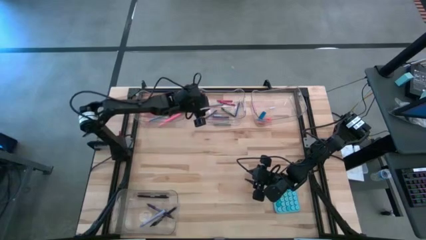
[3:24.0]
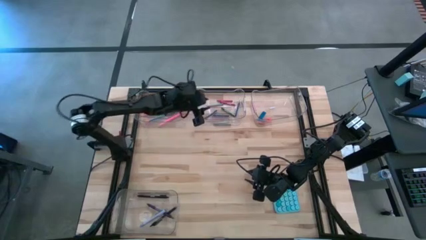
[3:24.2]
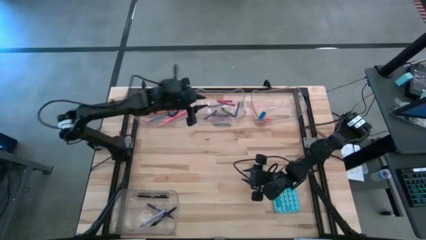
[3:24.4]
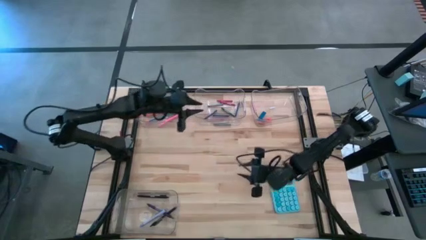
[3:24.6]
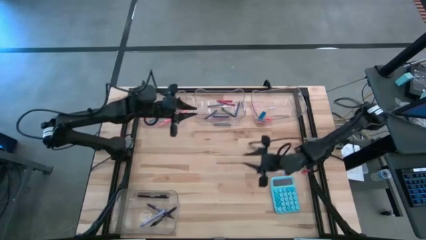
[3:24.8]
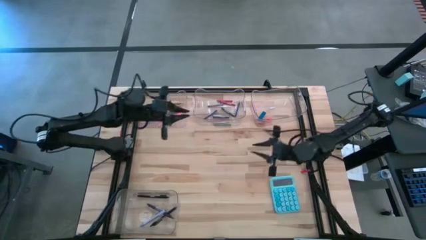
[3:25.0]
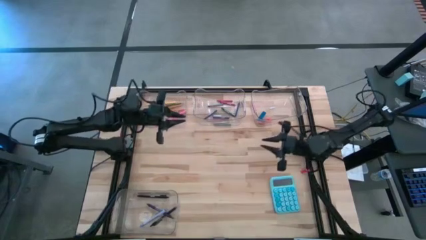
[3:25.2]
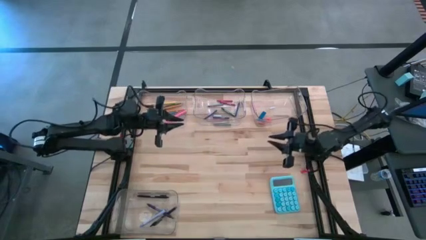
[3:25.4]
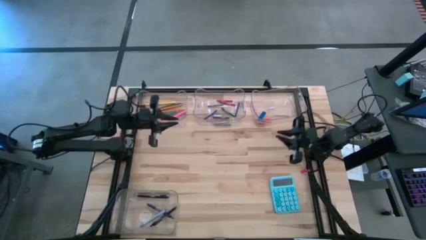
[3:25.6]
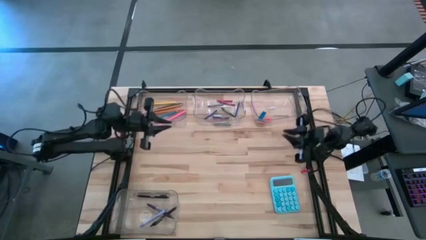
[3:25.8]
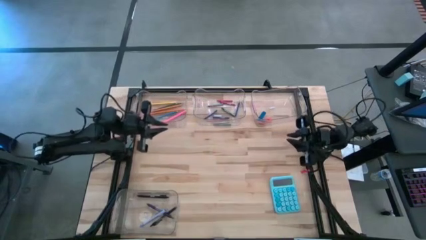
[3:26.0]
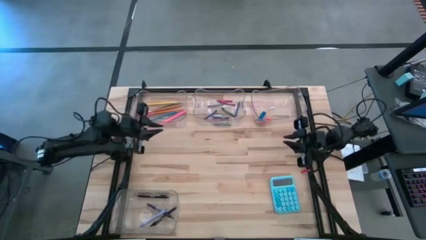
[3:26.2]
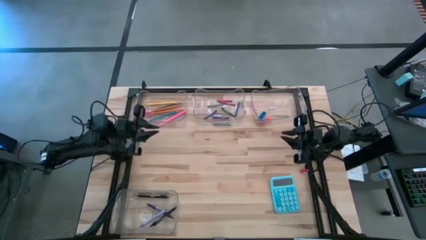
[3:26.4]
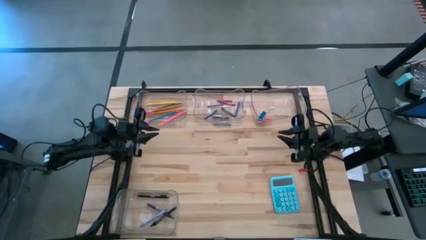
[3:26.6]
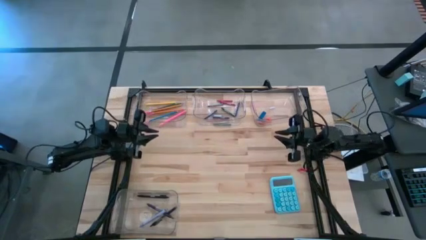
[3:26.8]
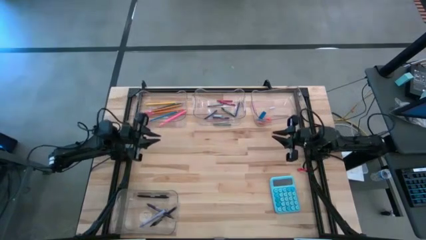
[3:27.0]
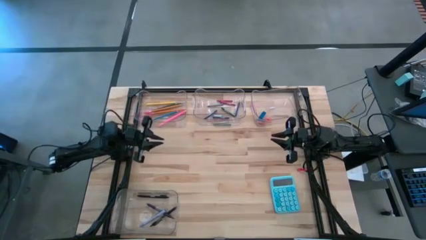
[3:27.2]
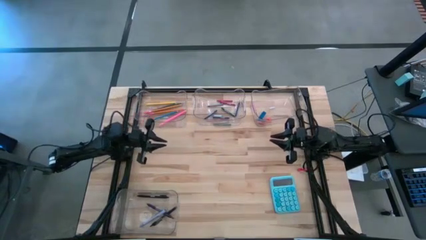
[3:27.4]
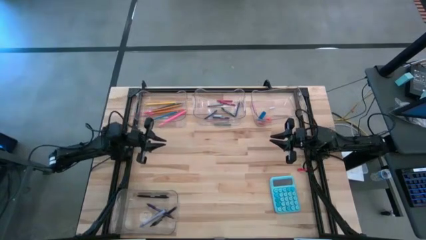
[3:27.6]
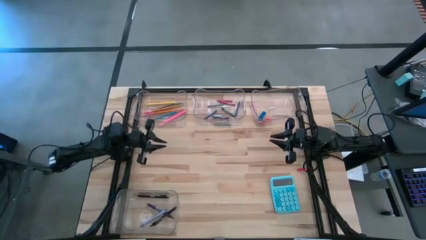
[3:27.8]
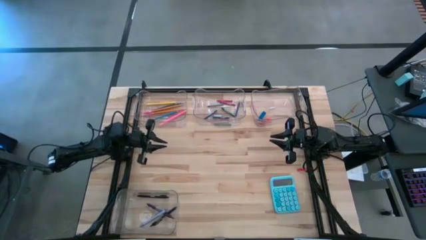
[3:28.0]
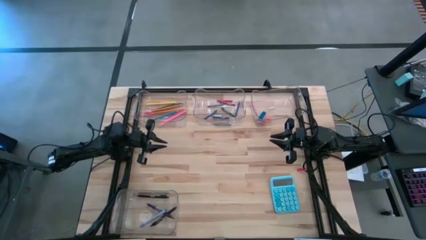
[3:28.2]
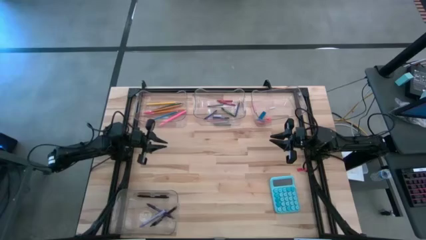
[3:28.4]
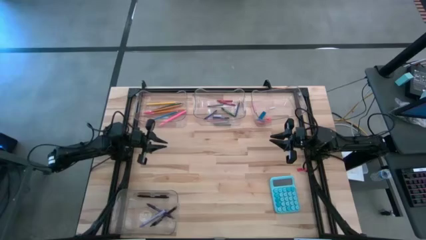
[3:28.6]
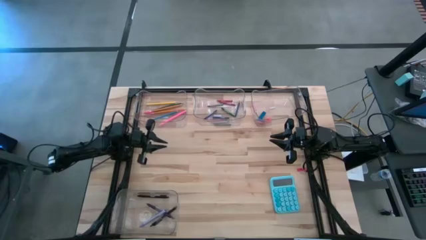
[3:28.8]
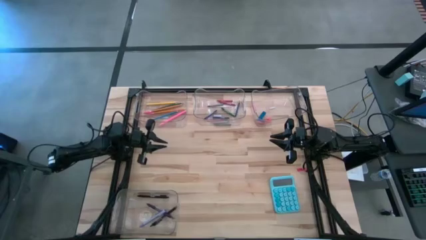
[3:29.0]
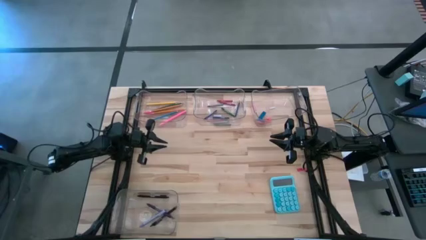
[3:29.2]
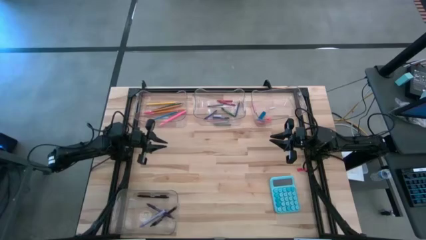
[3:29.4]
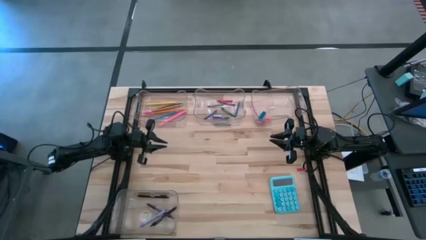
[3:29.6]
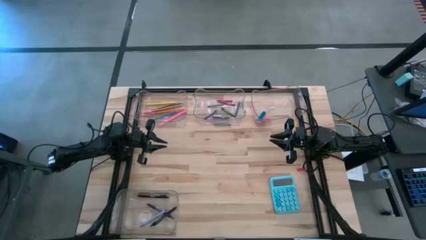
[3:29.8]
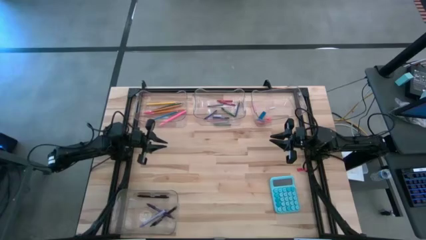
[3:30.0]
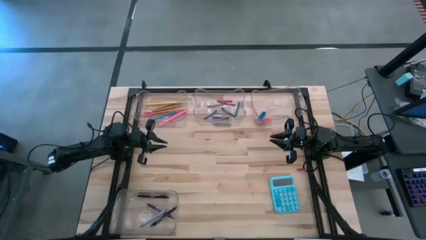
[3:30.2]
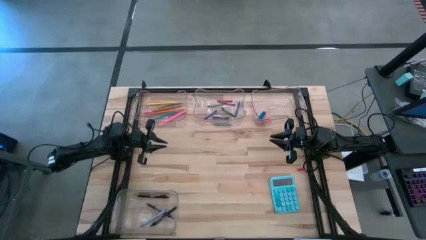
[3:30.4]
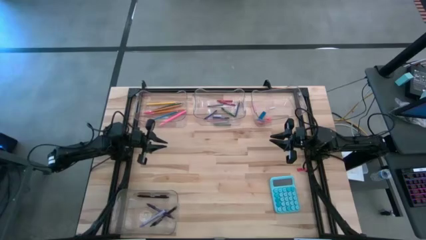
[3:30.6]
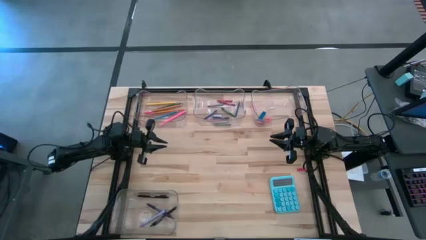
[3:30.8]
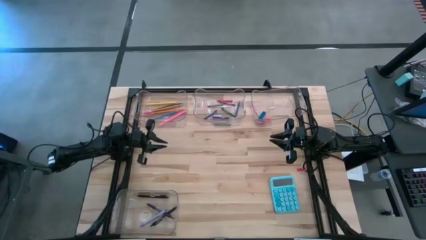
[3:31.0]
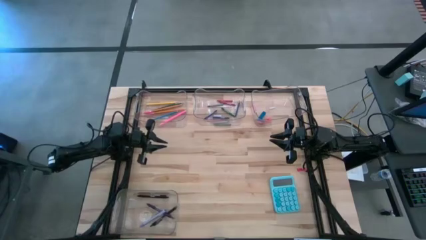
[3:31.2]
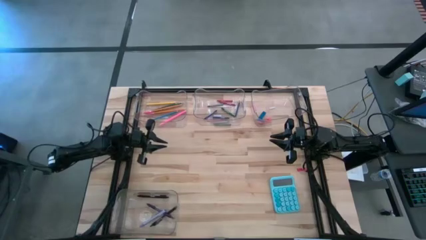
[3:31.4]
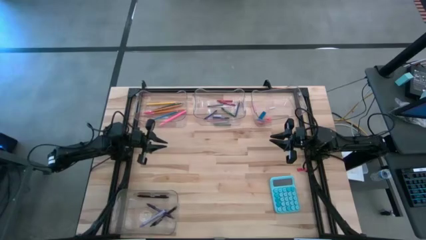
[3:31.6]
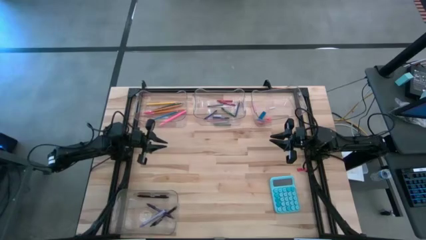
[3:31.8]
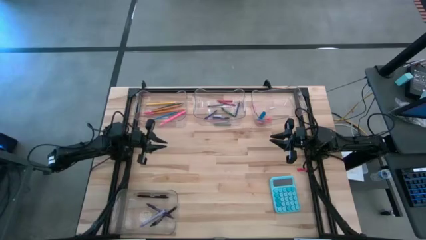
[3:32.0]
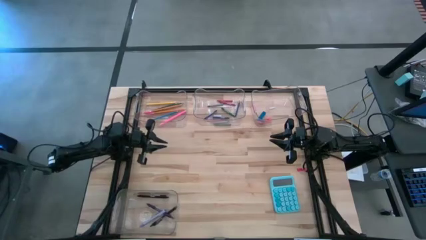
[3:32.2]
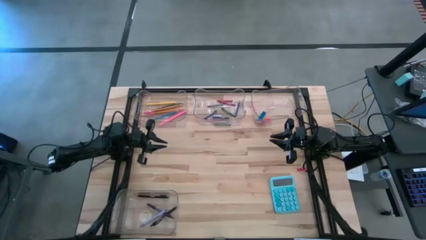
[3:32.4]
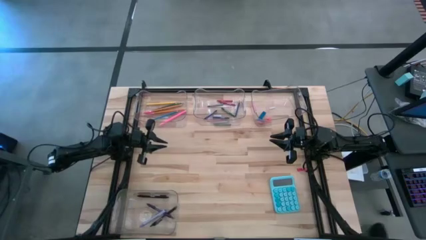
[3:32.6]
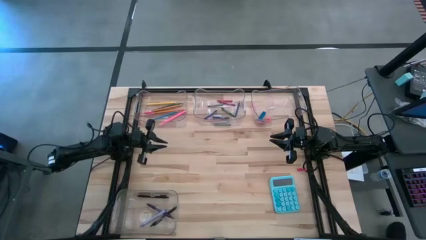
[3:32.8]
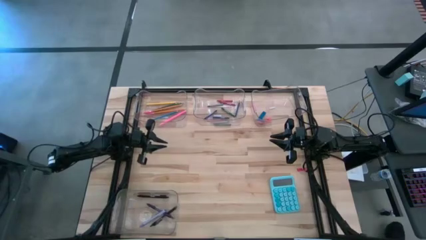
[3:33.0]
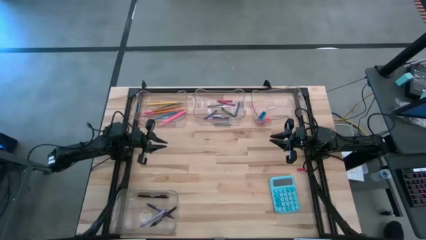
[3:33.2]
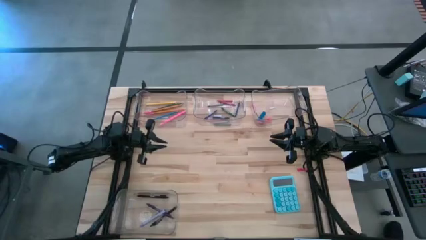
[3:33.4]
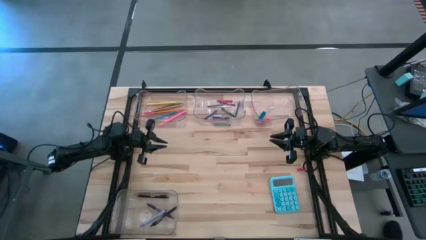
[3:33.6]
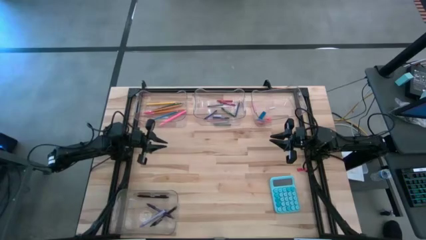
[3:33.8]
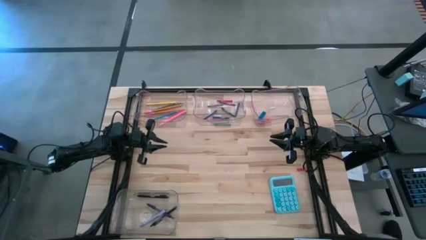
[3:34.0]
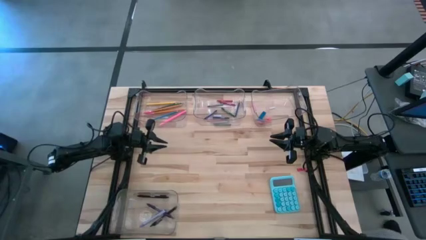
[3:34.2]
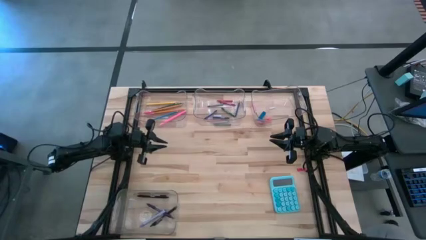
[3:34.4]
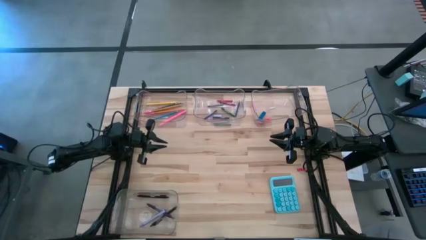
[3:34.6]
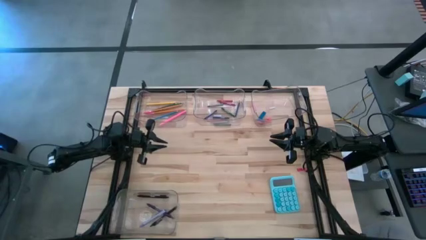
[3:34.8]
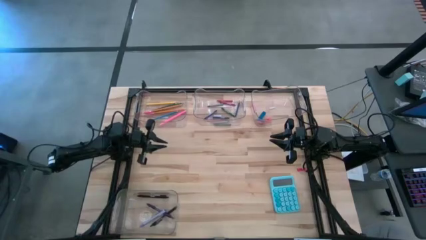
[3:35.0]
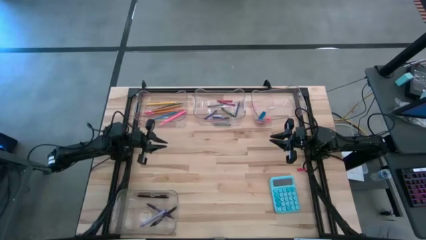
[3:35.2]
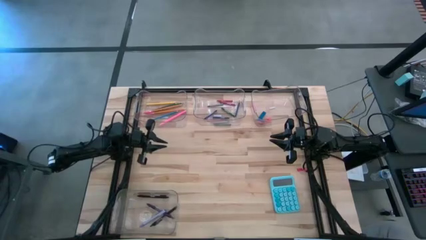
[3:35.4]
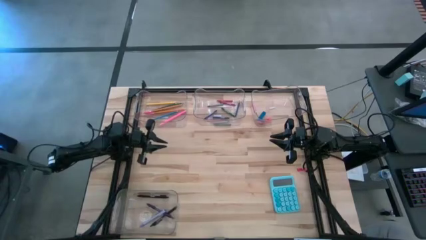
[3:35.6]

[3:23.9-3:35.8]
Task: Sort crayons/erasers/pens/pencils in bins
Return to Home Position

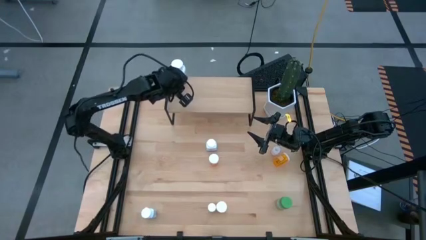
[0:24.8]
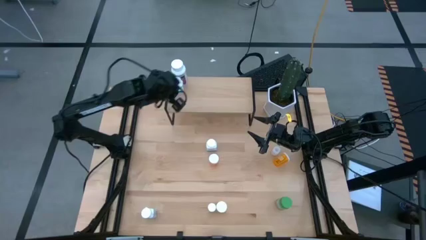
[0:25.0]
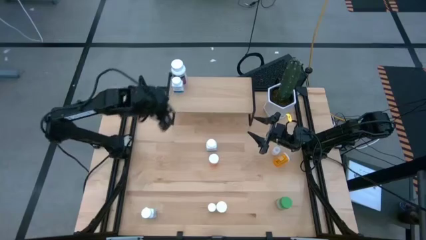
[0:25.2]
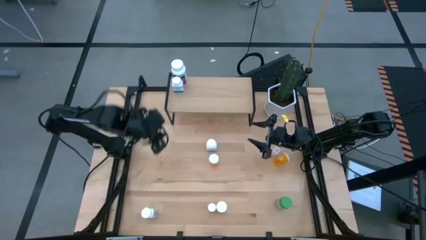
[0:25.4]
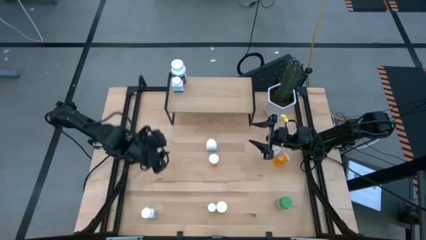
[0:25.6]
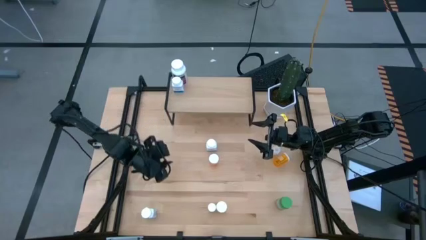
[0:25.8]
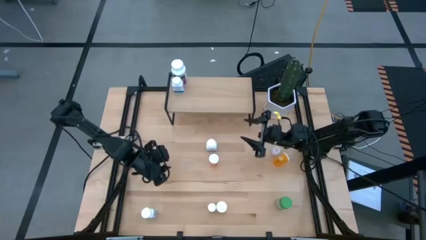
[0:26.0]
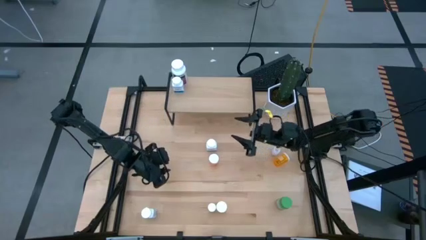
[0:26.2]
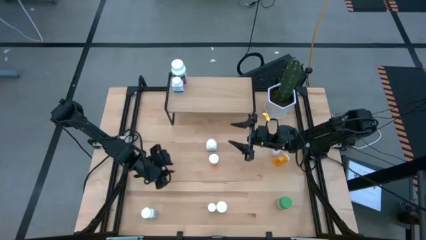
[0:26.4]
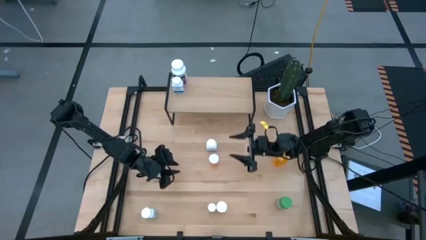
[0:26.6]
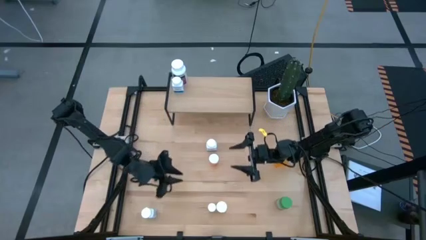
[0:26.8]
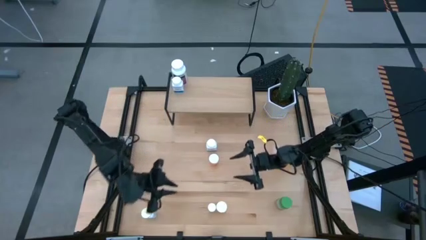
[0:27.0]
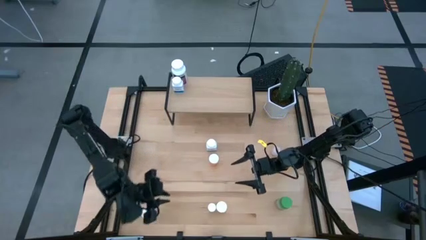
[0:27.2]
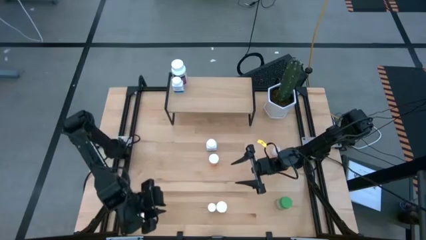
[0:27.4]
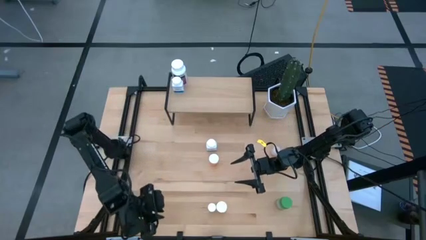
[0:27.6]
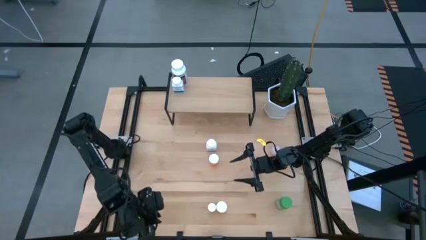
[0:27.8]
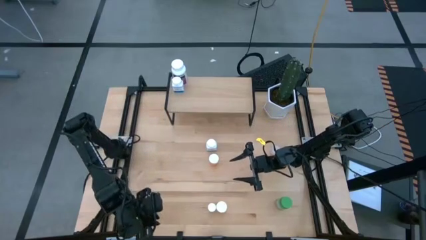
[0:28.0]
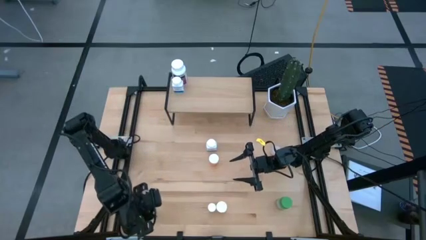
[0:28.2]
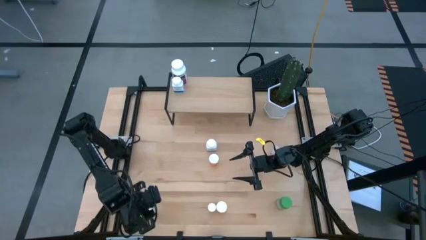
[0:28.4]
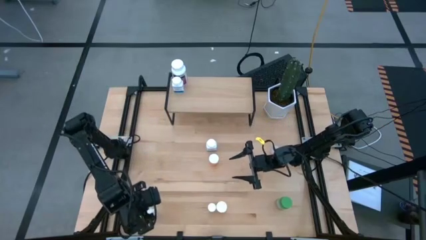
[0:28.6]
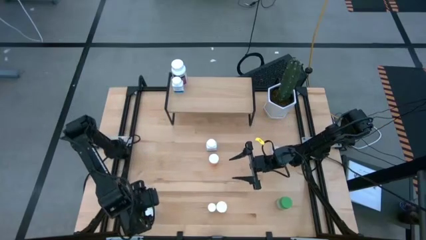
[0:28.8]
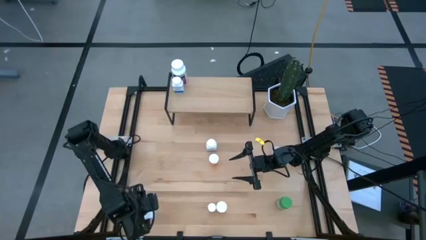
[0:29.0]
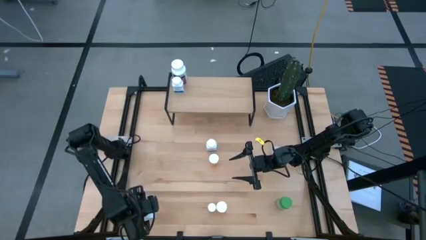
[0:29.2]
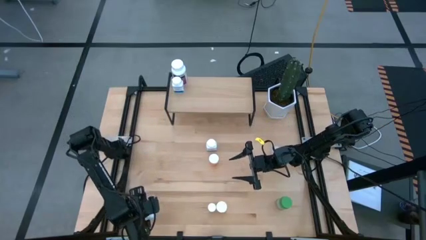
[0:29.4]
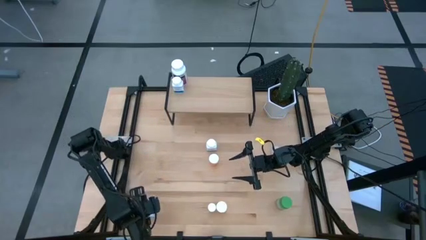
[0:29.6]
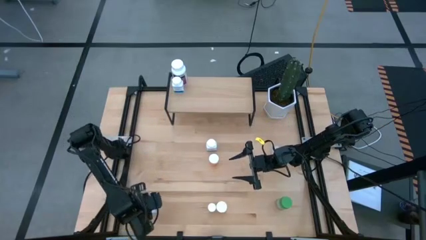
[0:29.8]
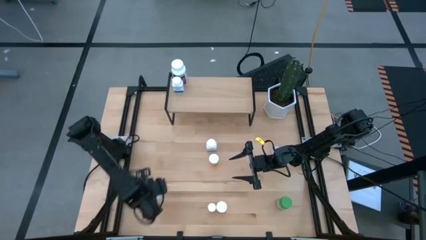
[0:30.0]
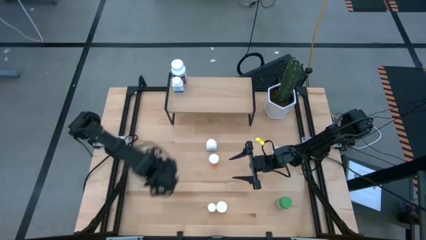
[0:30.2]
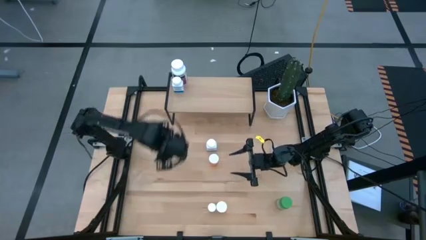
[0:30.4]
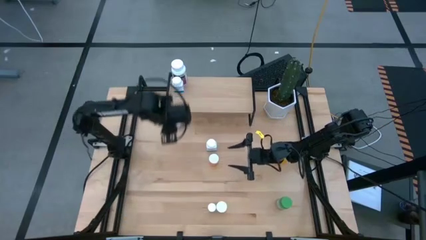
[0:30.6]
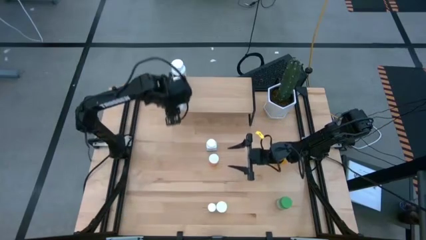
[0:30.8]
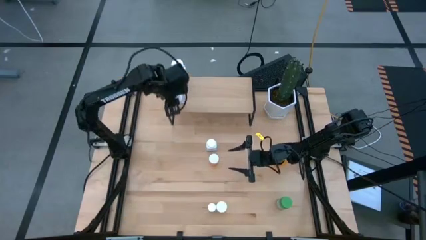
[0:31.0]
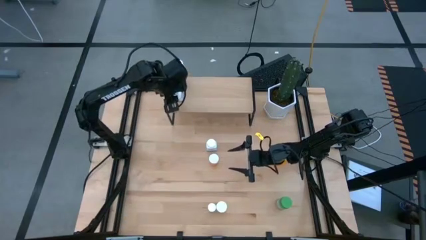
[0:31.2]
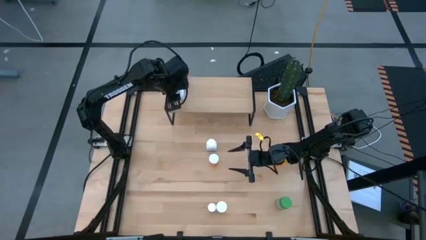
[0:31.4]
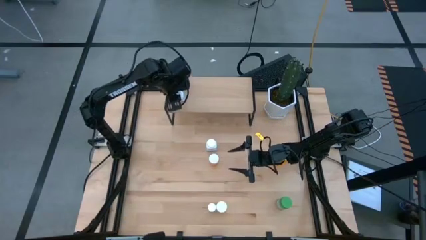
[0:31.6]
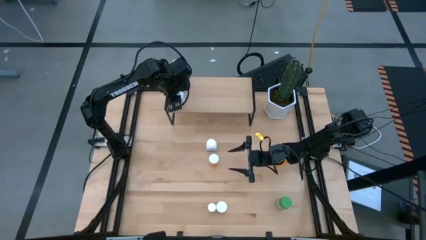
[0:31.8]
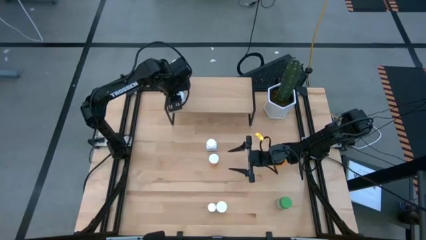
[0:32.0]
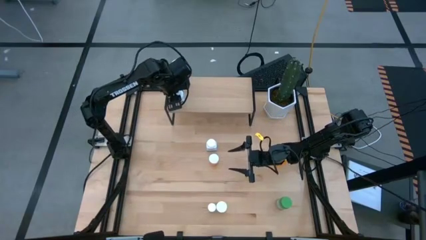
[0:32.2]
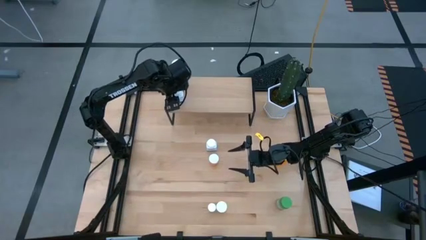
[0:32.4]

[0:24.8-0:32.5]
Task: Pick and place medicine bottles onto shelf by color
Put the bottom white blue pill bottle on the shelf
